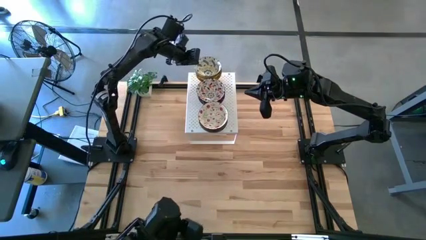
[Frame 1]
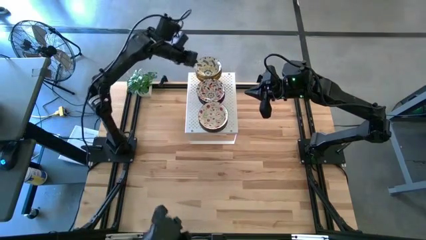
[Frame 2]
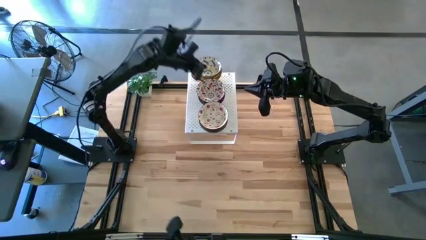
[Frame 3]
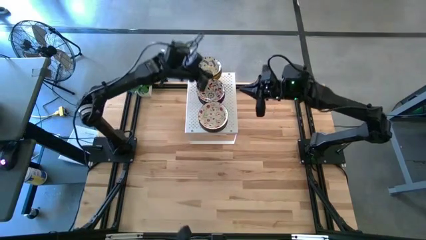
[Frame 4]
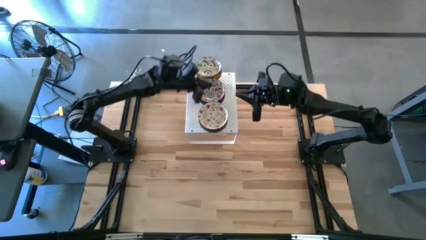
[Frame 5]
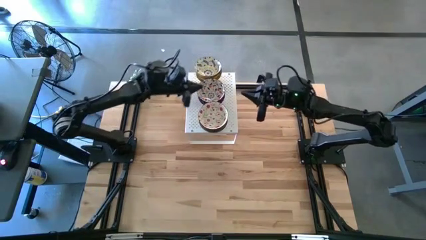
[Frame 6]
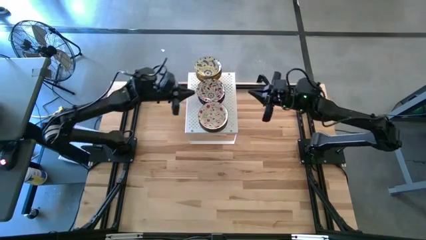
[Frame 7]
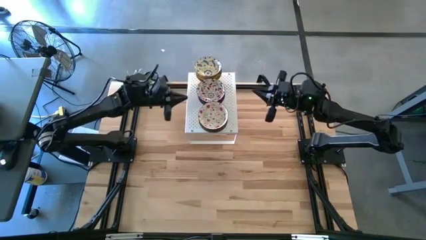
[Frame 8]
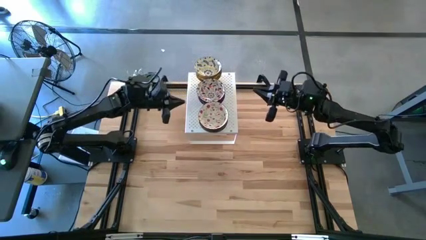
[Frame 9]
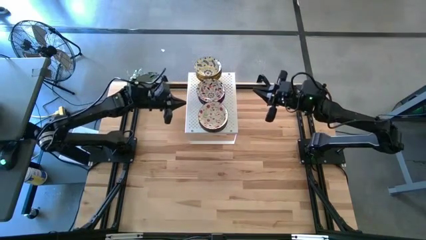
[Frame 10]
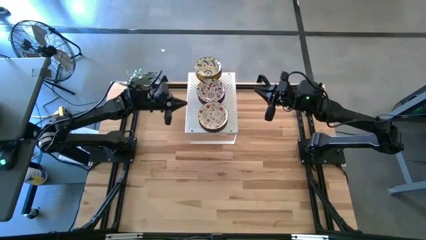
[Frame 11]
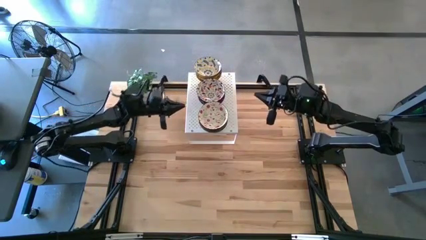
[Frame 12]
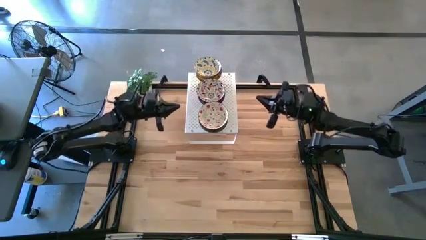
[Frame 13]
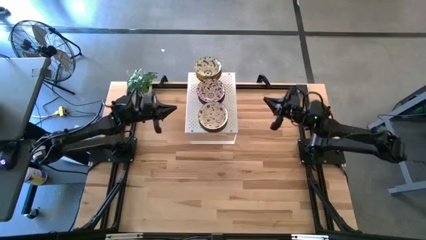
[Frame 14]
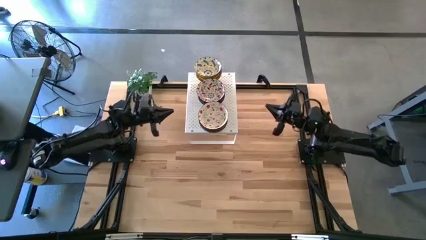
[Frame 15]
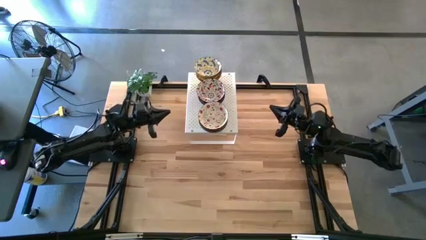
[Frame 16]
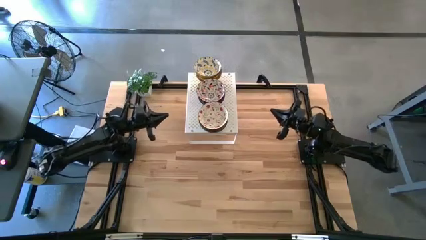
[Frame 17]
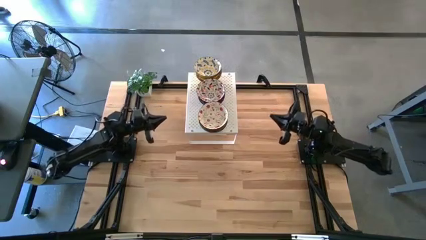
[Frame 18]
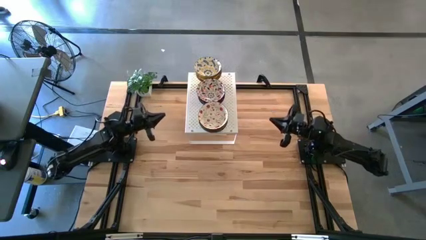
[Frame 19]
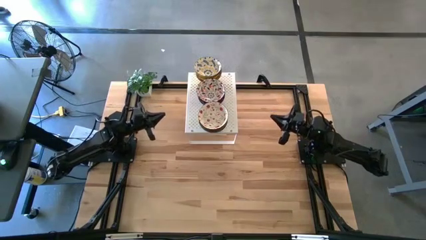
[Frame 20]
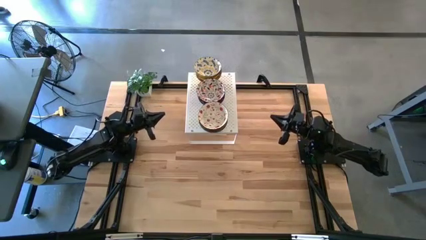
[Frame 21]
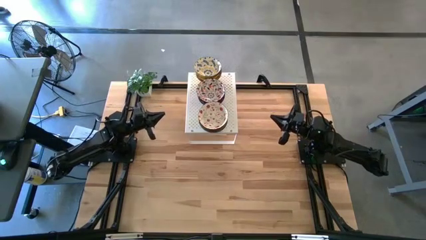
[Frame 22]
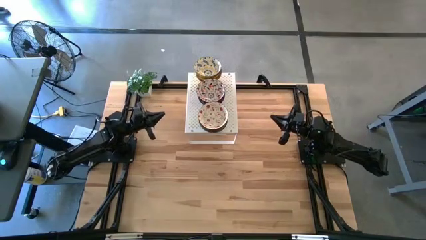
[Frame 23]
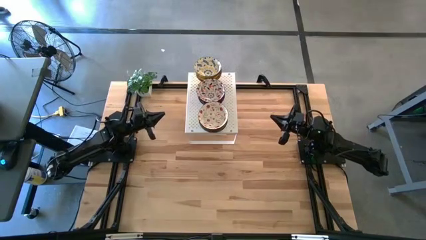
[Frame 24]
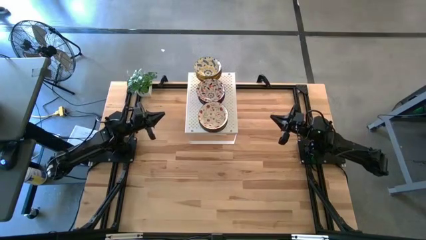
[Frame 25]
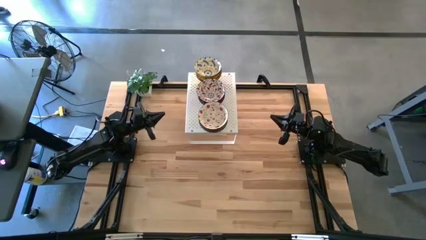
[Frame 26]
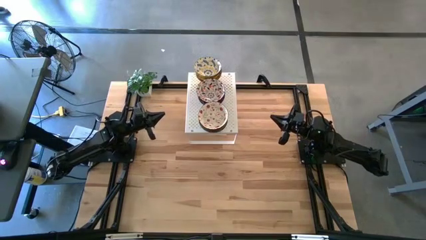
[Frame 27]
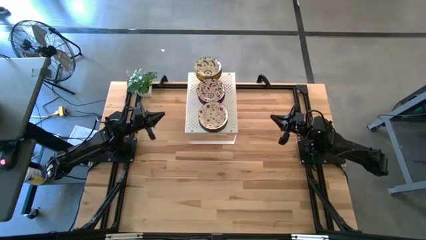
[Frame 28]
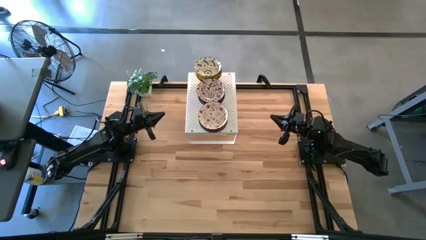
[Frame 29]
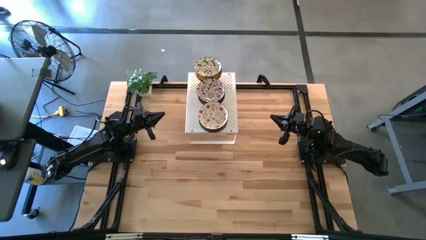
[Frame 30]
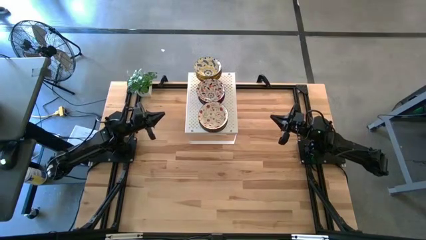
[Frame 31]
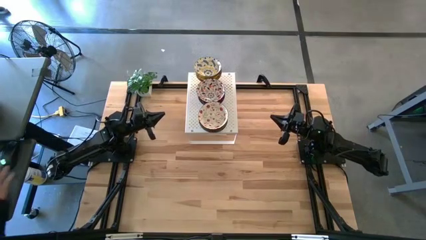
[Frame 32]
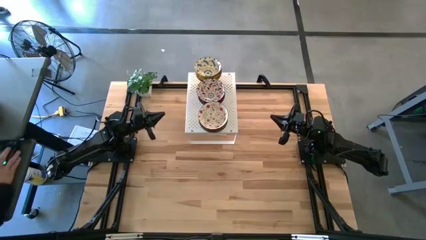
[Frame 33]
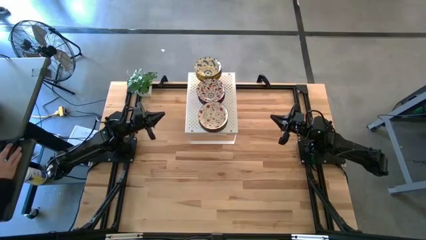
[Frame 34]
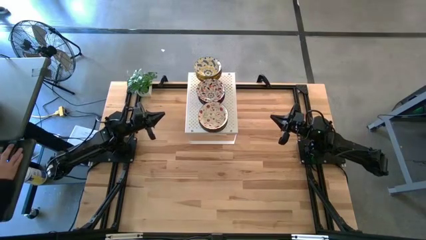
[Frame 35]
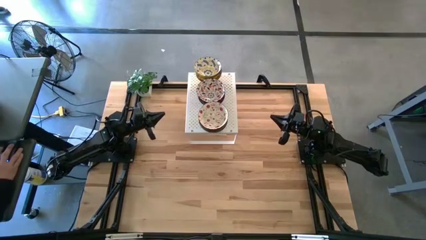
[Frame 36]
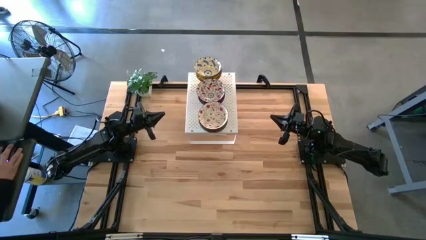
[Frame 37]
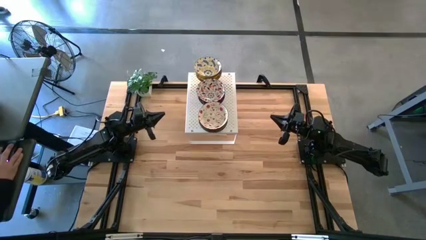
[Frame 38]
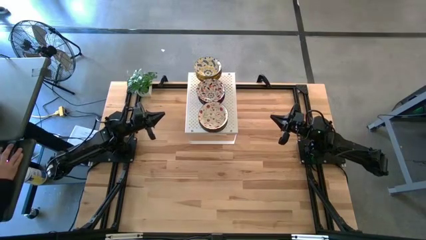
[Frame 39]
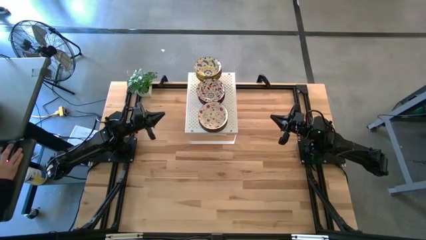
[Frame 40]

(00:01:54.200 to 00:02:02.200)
Task: Pick & Place Mini bowls
Return to Home Position

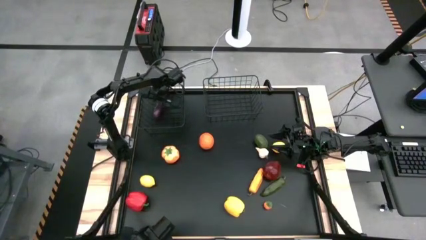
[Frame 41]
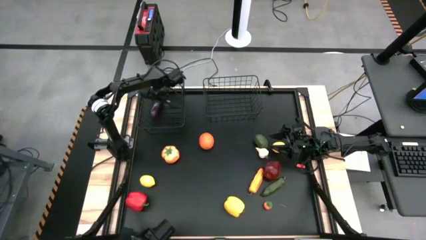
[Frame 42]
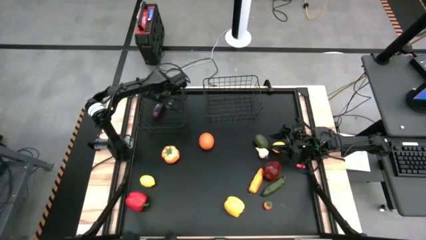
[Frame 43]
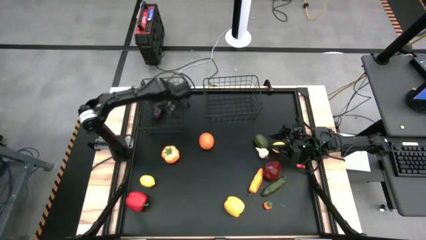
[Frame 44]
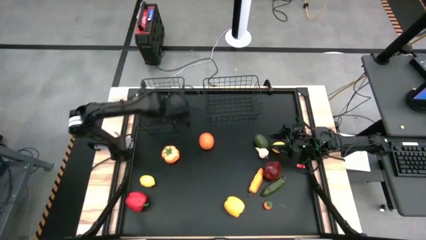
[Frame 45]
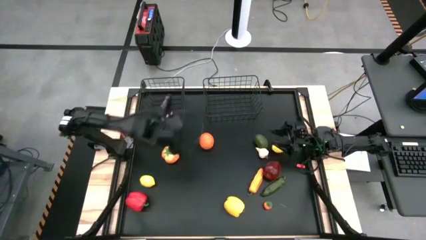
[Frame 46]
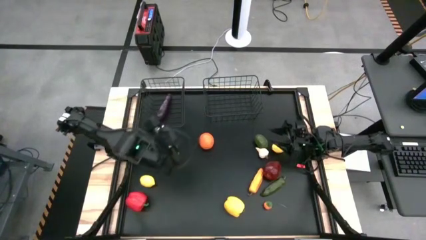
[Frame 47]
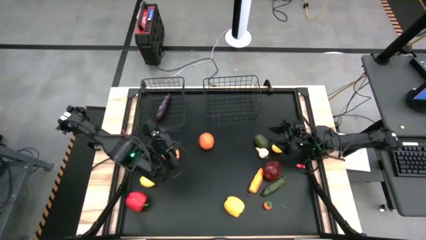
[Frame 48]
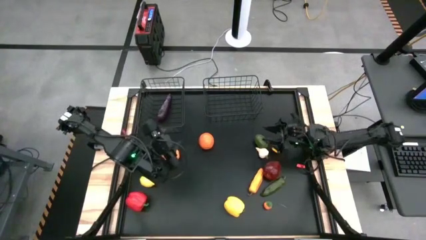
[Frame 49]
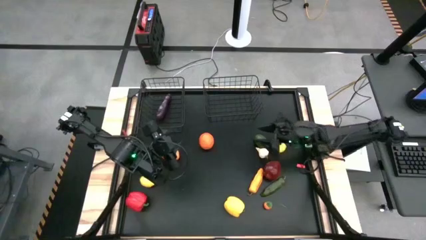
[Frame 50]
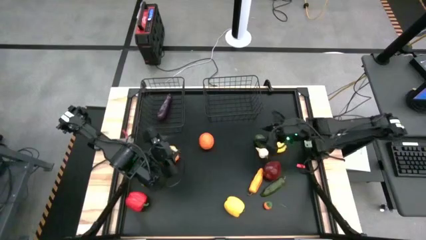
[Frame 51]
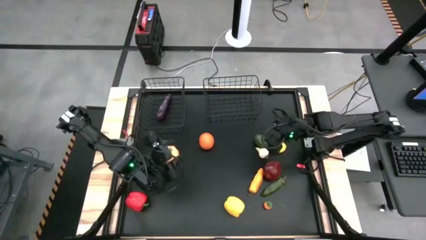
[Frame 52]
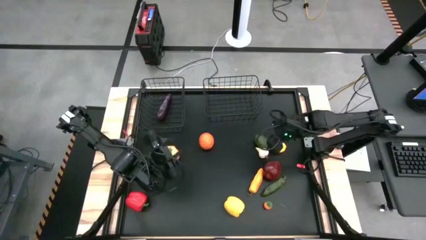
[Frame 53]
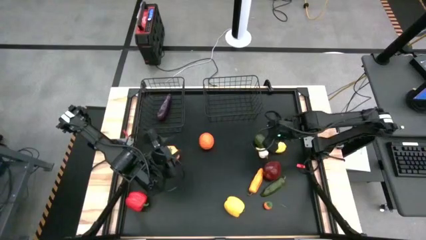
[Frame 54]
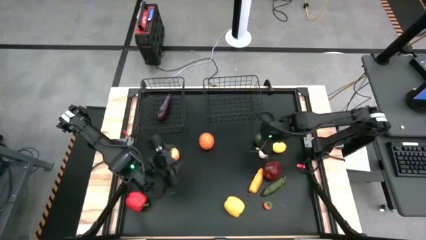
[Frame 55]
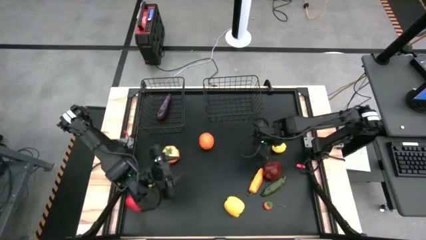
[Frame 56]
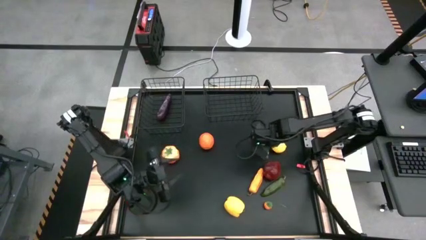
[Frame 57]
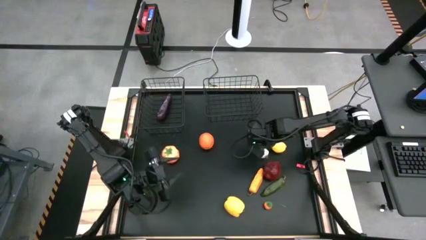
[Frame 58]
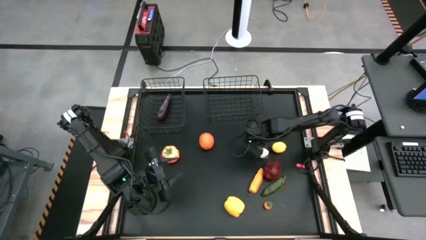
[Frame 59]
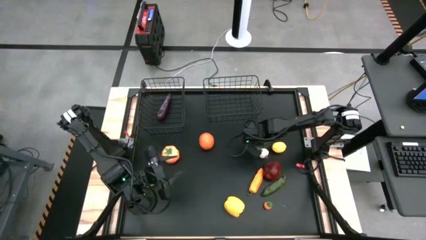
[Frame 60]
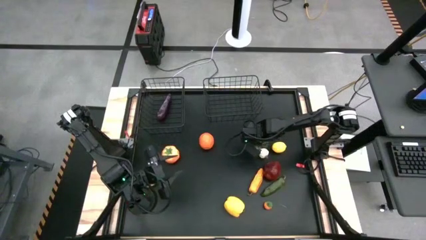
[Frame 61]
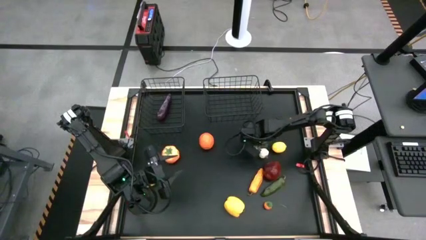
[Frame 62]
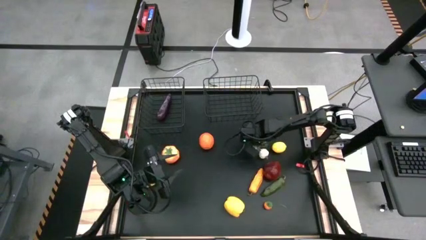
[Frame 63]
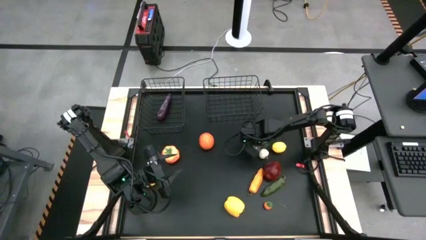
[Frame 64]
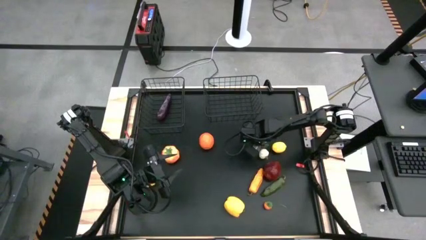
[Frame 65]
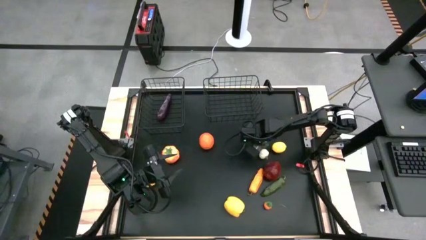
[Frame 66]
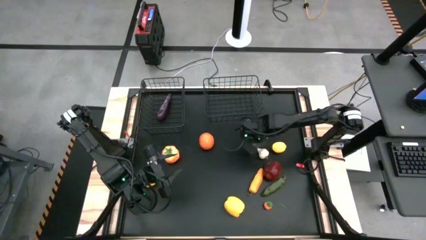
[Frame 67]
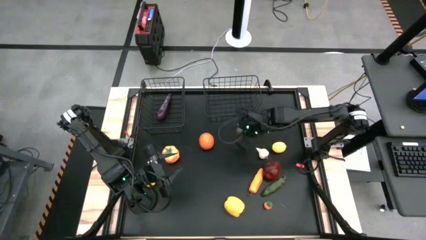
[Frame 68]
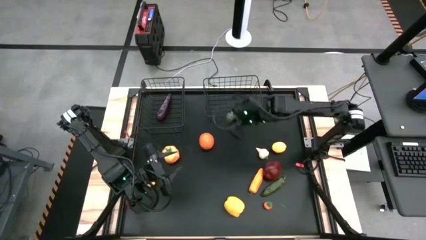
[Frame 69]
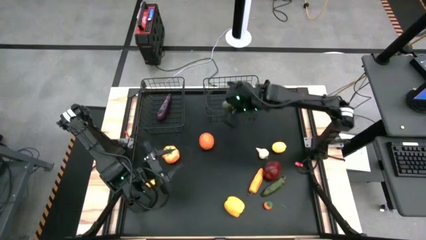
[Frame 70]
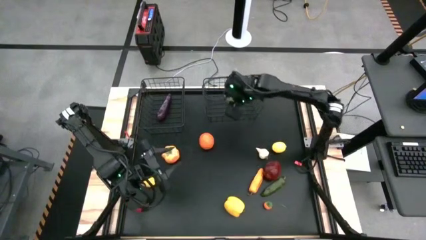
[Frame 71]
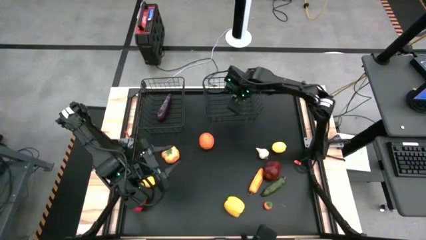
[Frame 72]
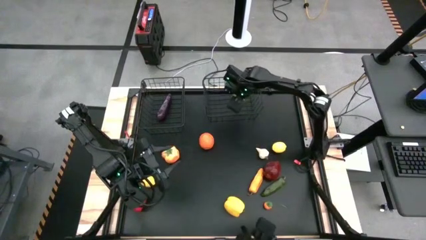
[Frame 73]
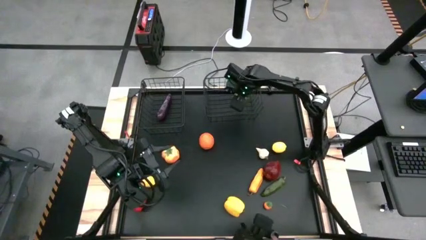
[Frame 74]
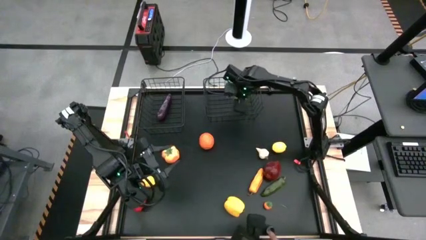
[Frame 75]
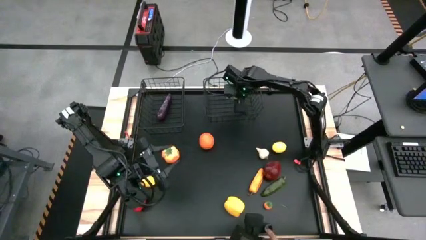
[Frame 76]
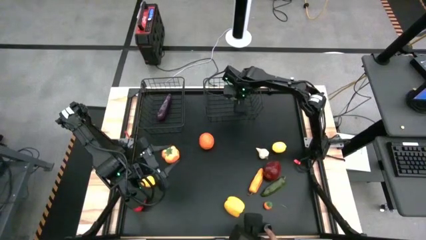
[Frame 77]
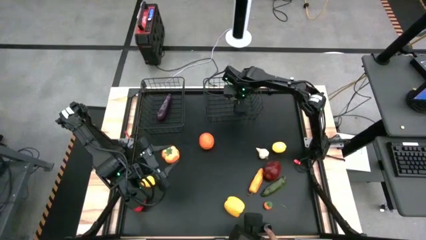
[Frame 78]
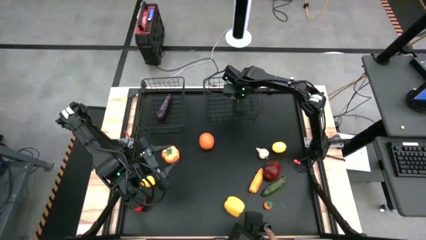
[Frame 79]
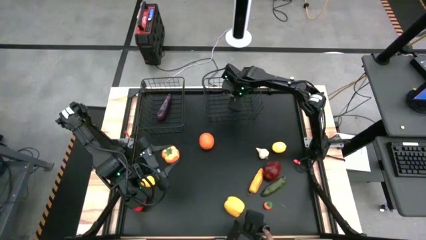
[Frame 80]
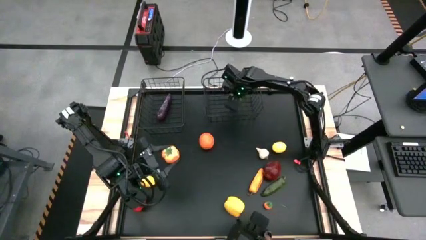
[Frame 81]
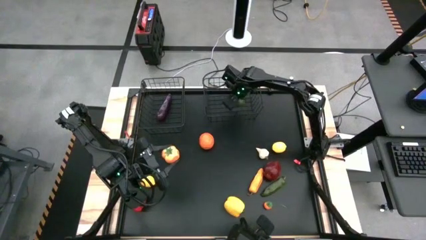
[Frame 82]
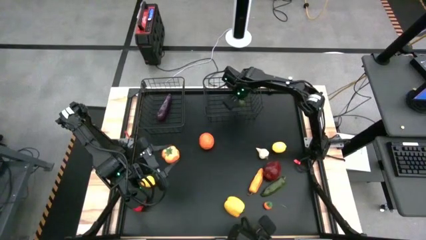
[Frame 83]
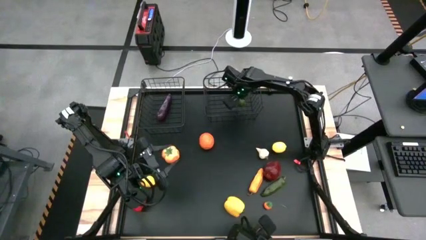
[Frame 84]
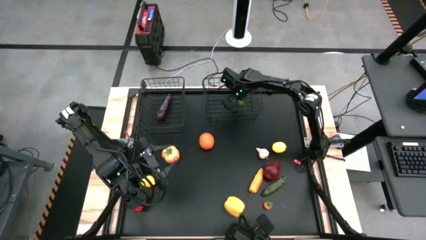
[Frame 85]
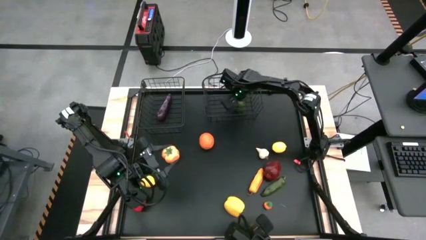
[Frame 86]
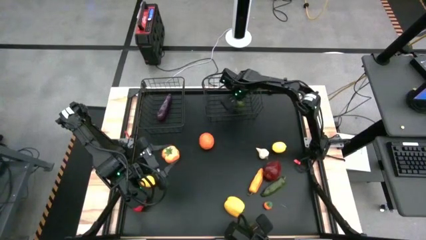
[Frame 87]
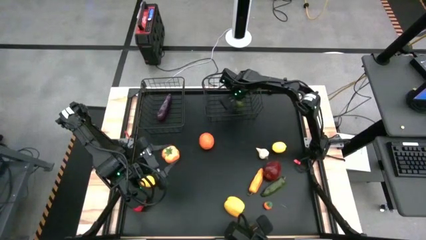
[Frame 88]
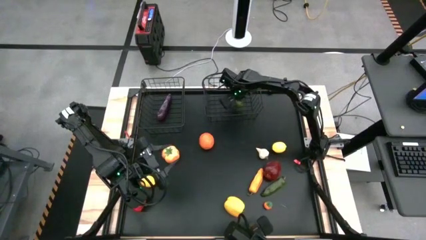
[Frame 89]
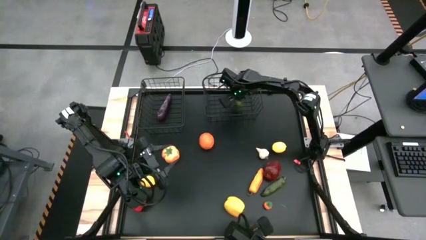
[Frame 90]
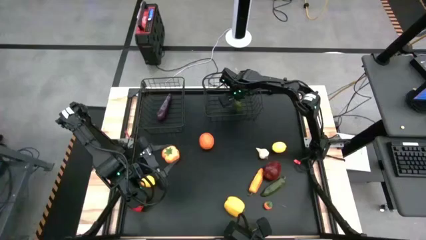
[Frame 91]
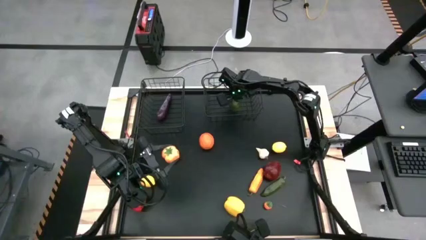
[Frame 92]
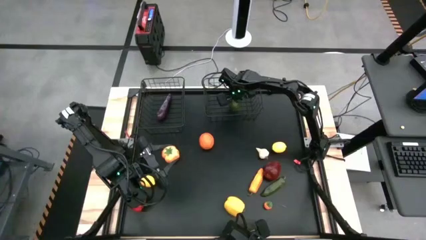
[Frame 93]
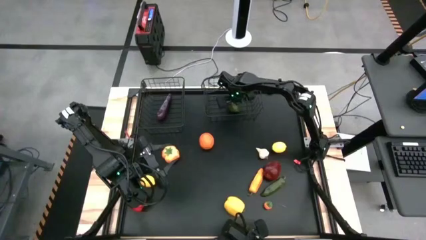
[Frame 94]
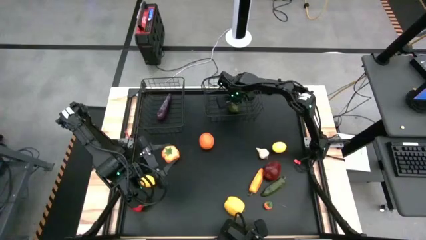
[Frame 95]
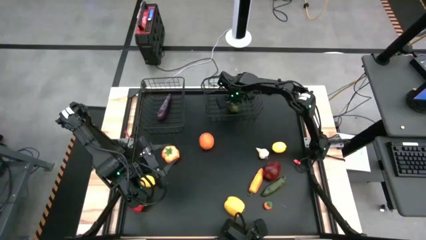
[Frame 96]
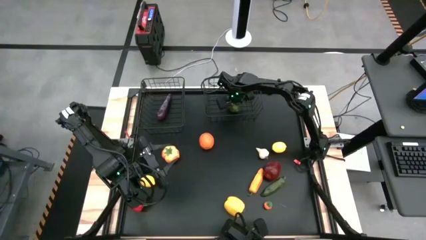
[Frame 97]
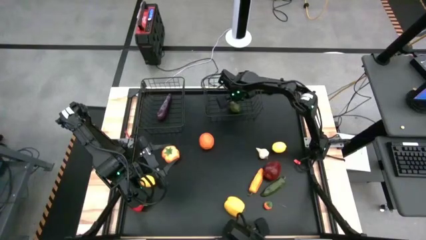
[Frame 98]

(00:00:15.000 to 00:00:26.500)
Task: Sort produce into baskets
Put the green lime into the right black wire basket
